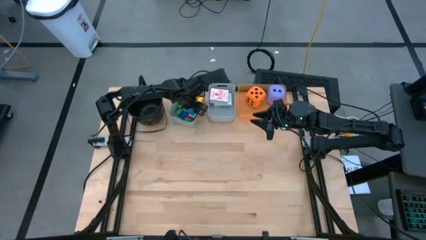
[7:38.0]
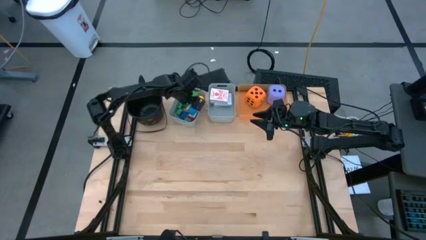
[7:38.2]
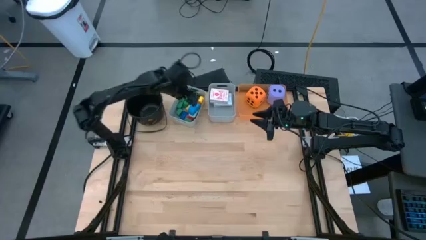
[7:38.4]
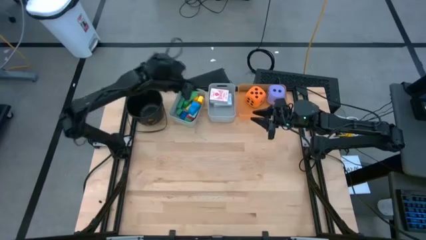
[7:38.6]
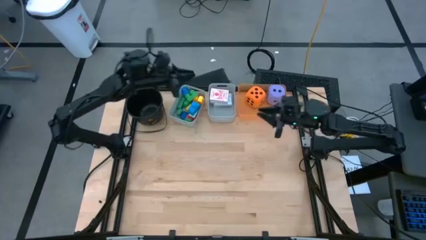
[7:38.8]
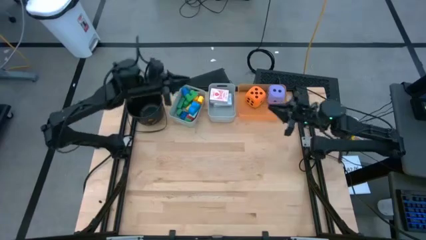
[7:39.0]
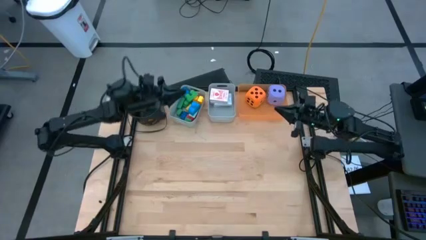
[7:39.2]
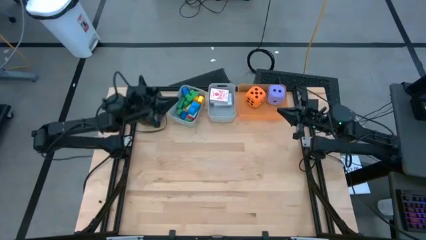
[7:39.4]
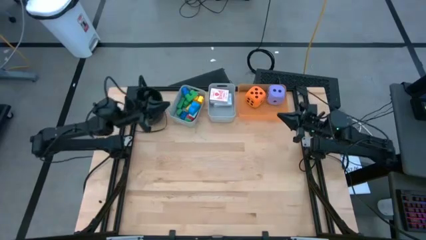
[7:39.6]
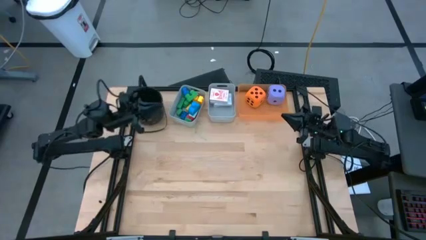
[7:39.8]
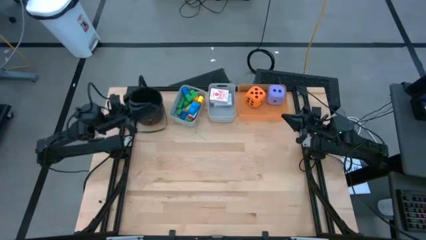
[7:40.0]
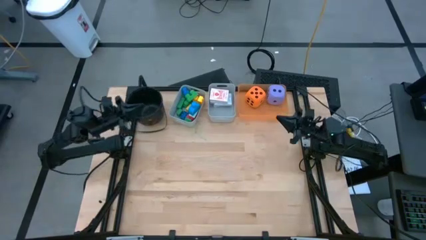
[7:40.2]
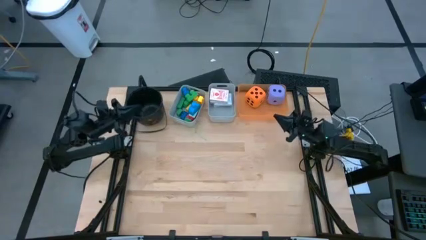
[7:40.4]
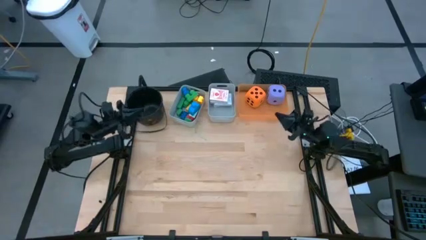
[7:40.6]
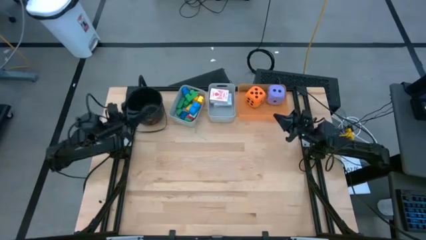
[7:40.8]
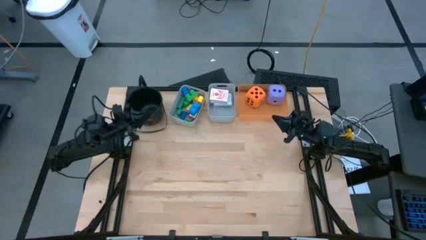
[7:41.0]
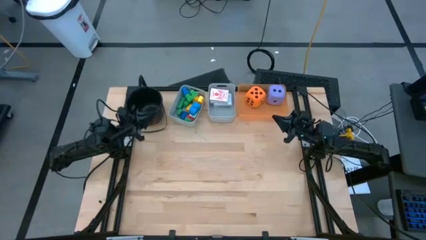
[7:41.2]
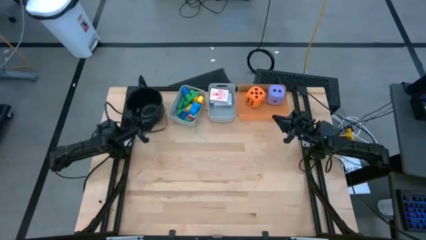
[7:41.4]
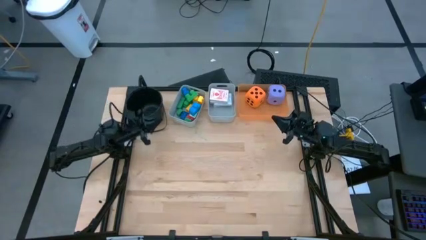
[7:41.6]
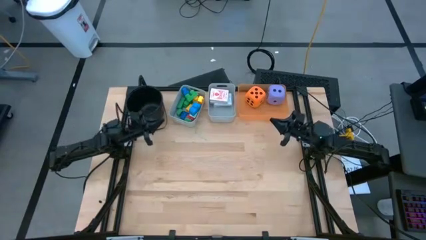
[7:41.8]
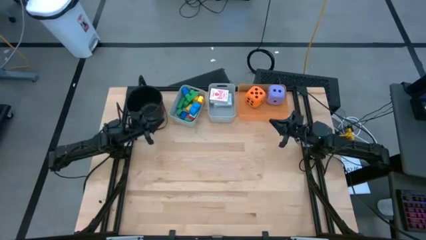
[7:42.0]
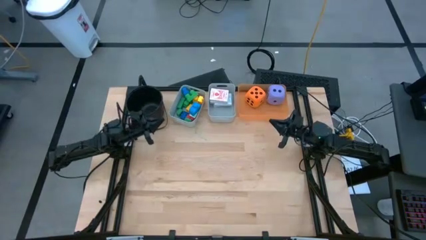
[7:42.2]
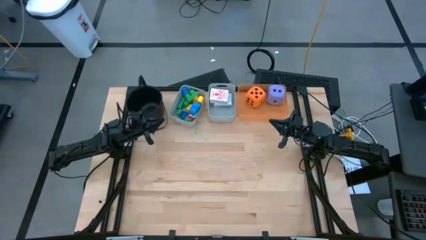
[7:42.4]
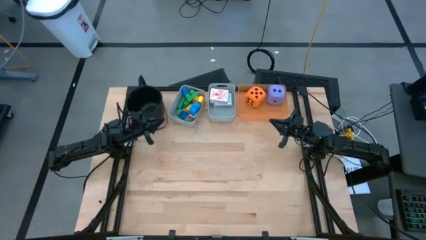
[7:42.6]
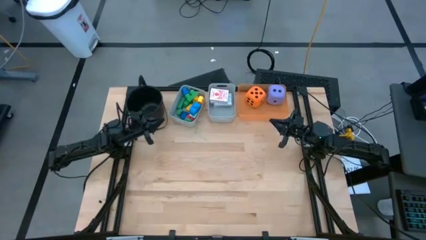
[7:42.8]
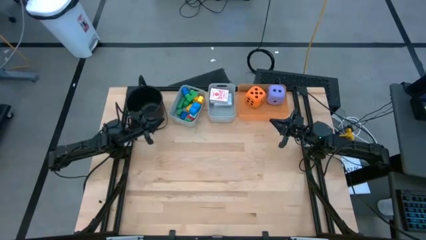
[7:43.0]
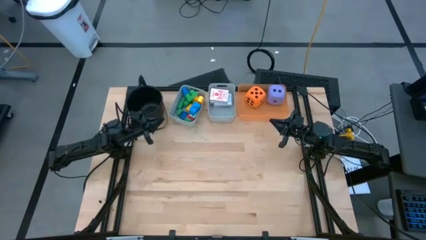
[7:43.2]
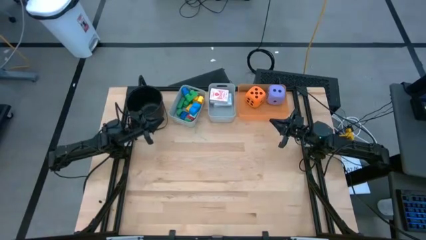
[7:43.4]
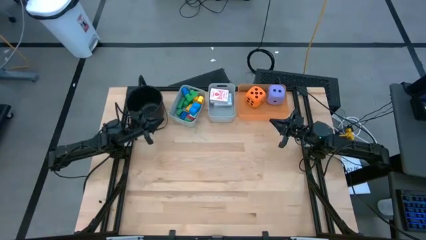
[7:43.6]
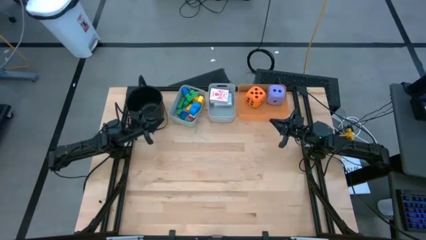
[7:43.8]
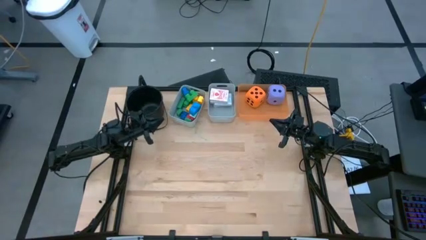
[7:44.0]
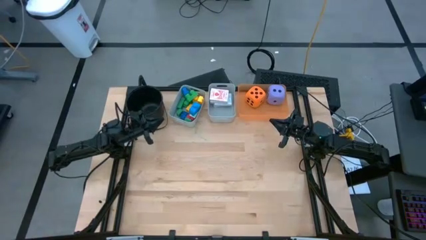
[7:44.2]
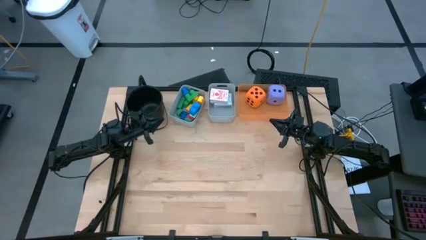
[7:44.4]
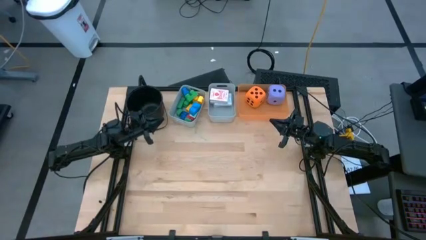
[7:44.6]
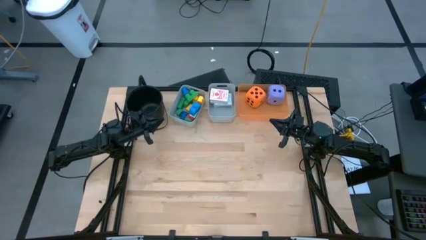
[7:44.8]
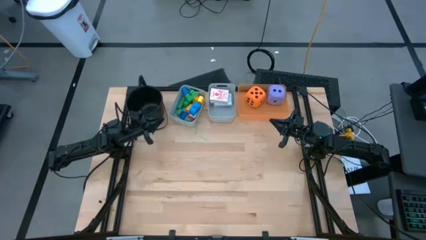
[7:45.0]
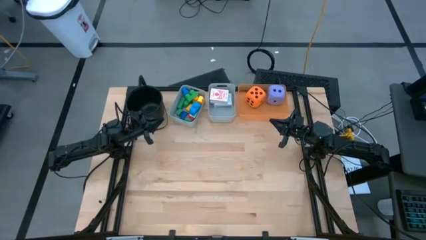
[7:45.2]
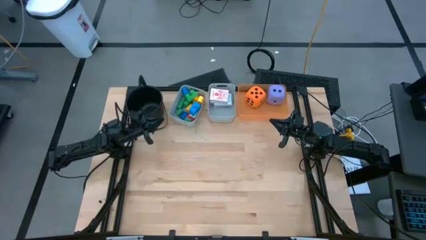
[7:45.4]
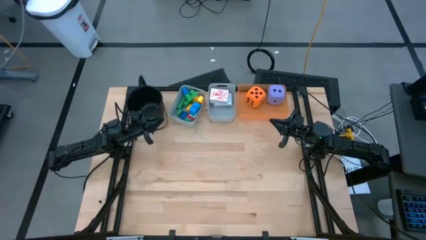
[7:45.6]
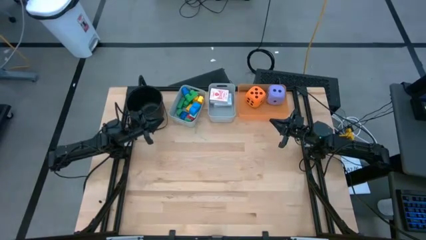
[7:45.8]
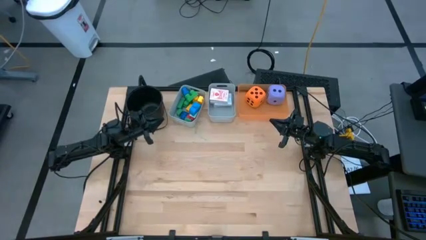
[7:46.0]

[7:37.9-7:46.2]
Task: Pick & Place Toys
Return to Home Position
